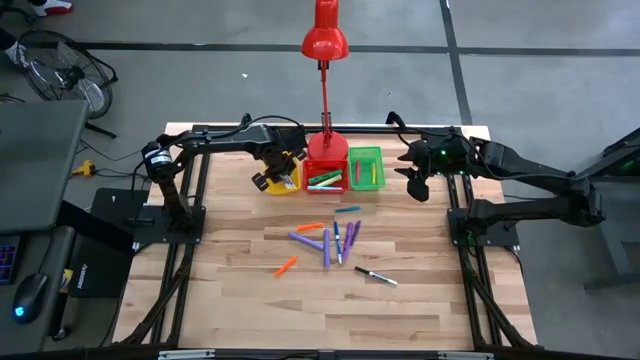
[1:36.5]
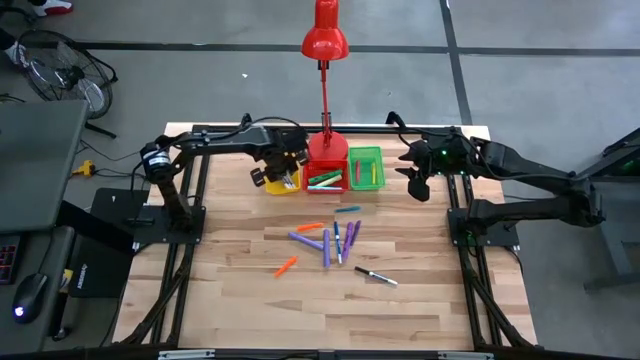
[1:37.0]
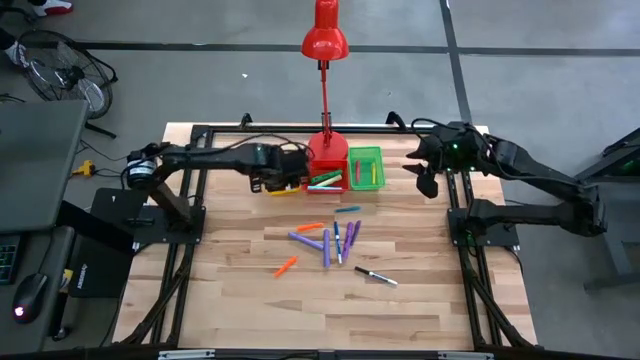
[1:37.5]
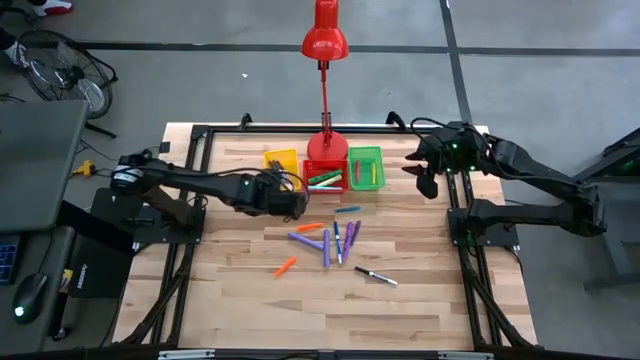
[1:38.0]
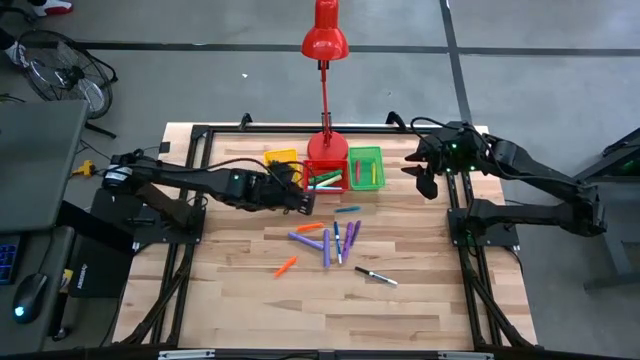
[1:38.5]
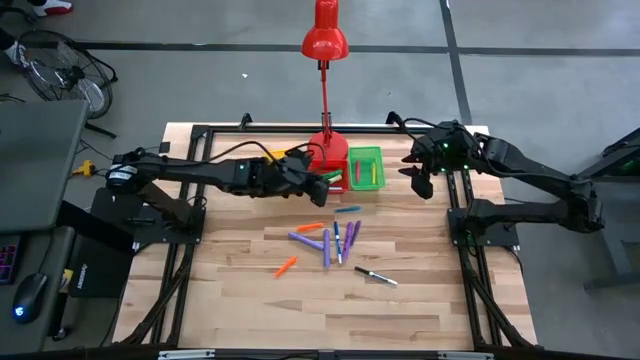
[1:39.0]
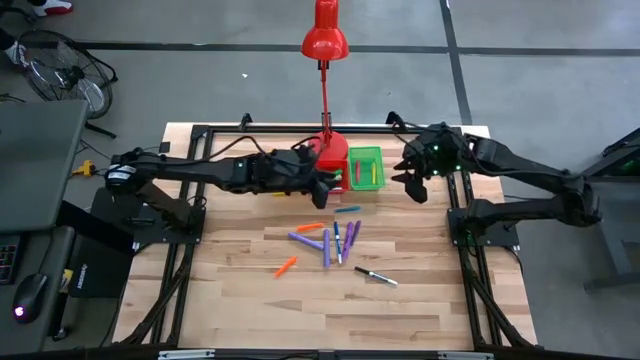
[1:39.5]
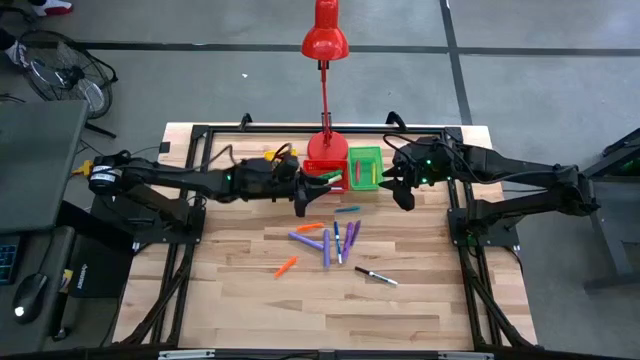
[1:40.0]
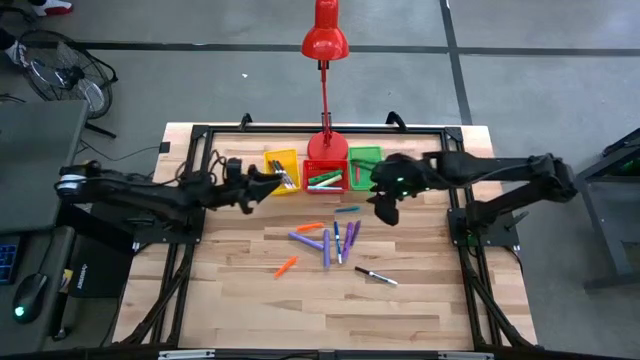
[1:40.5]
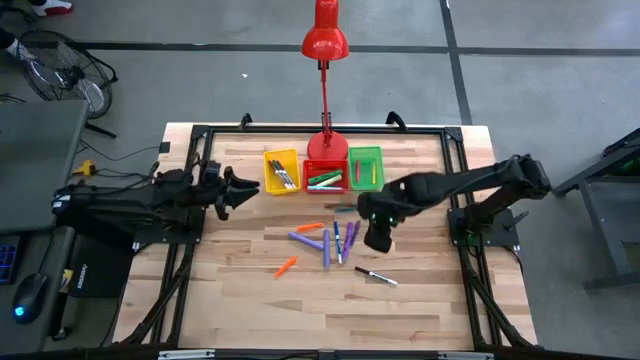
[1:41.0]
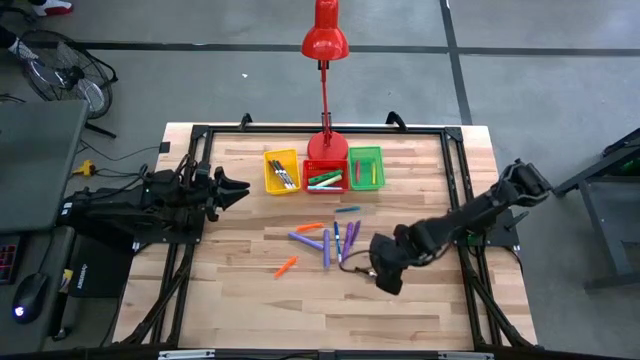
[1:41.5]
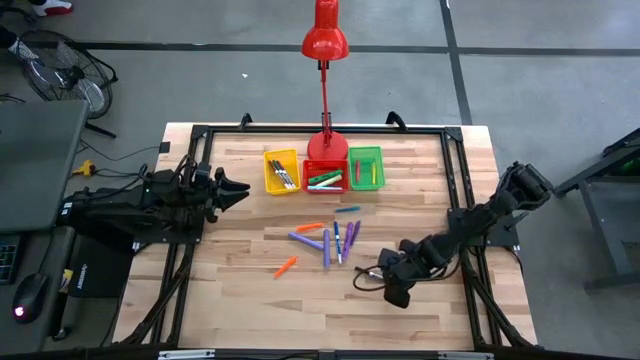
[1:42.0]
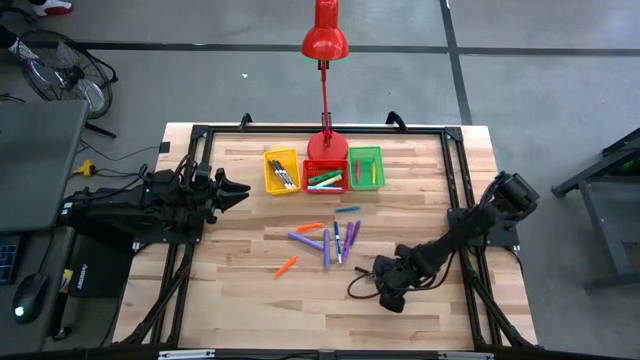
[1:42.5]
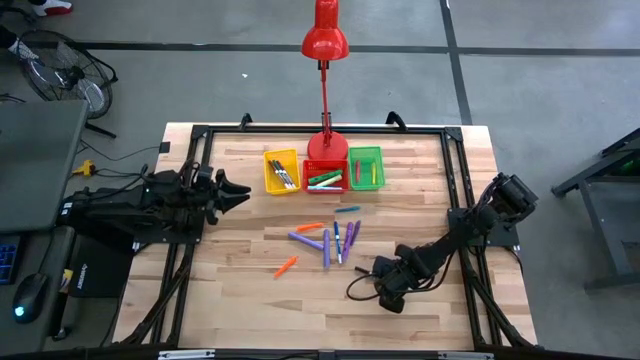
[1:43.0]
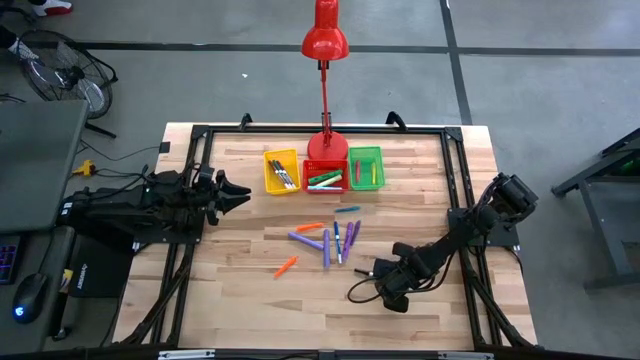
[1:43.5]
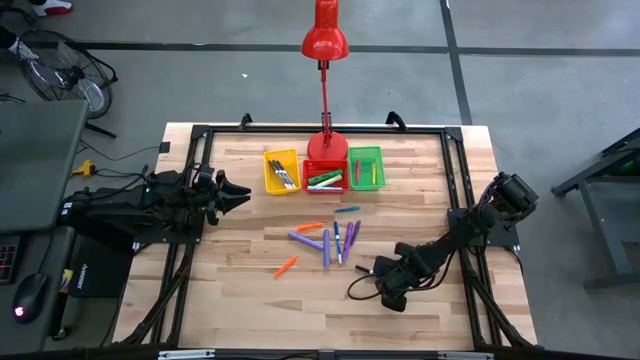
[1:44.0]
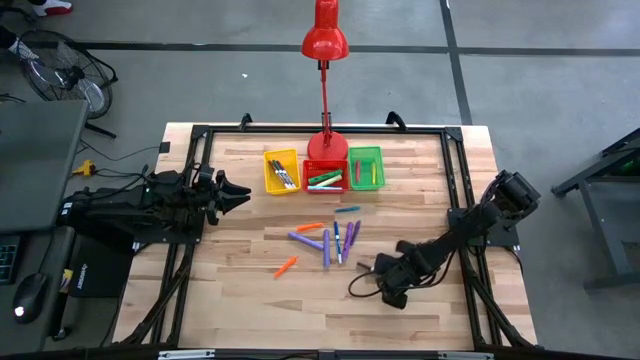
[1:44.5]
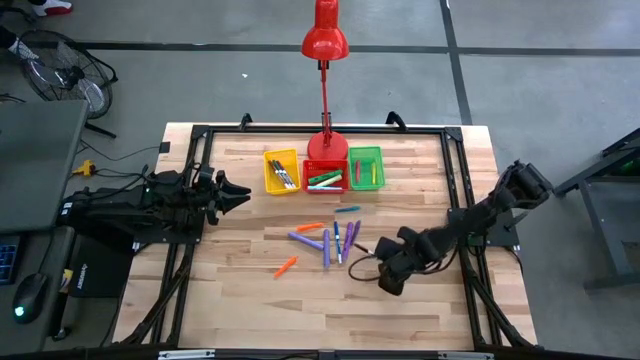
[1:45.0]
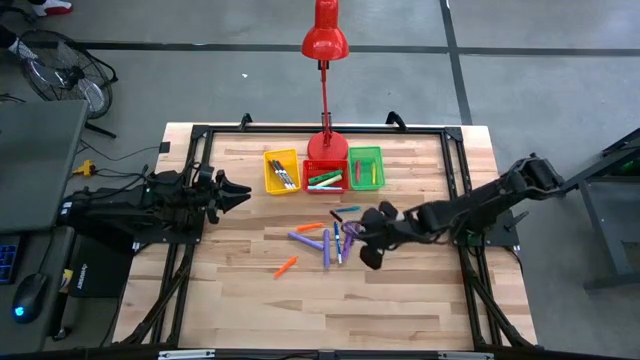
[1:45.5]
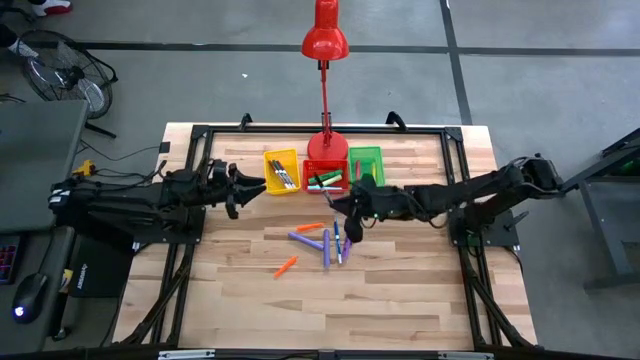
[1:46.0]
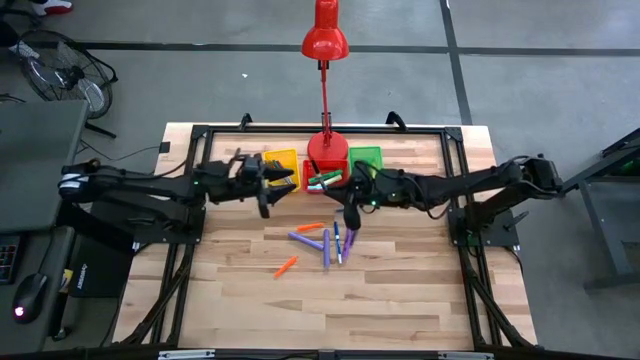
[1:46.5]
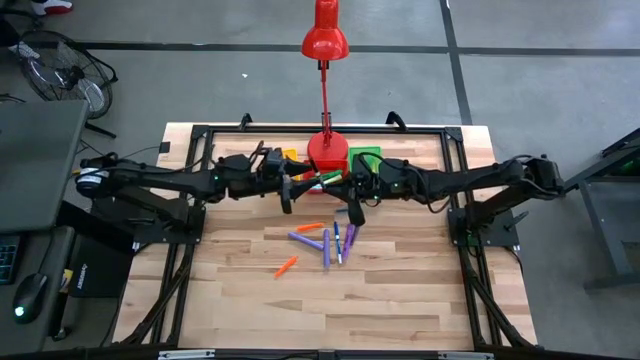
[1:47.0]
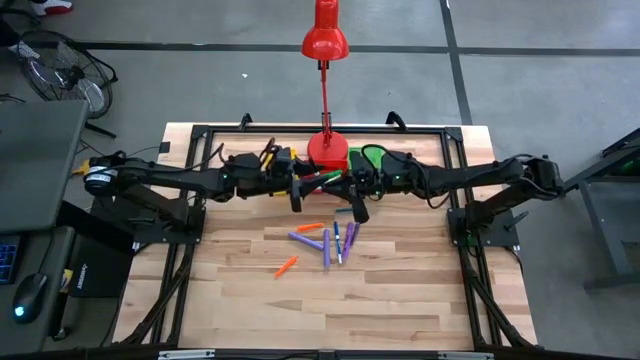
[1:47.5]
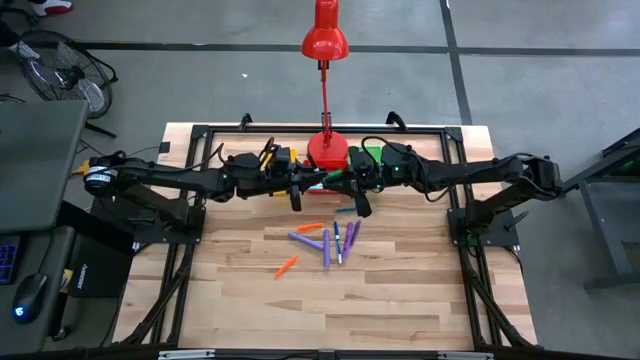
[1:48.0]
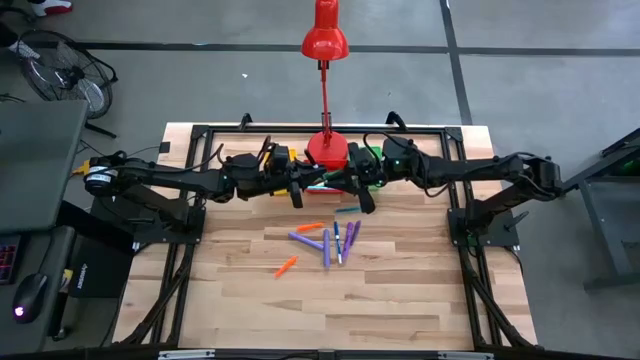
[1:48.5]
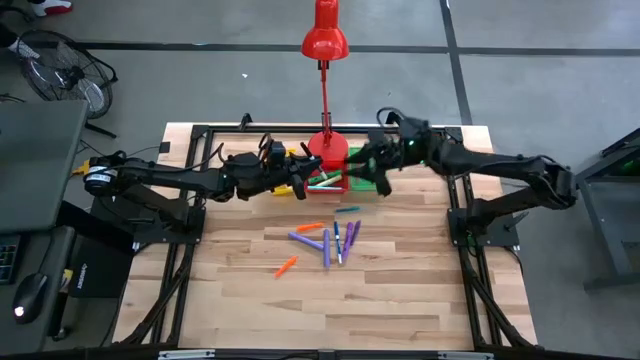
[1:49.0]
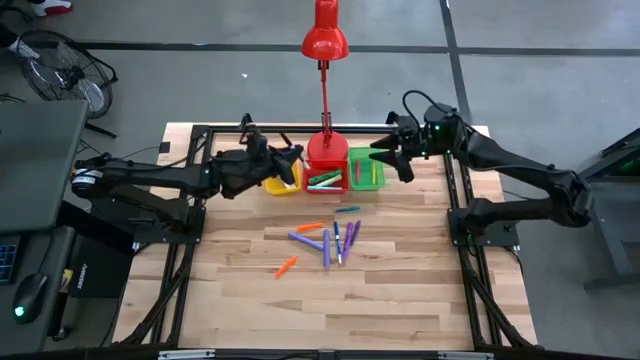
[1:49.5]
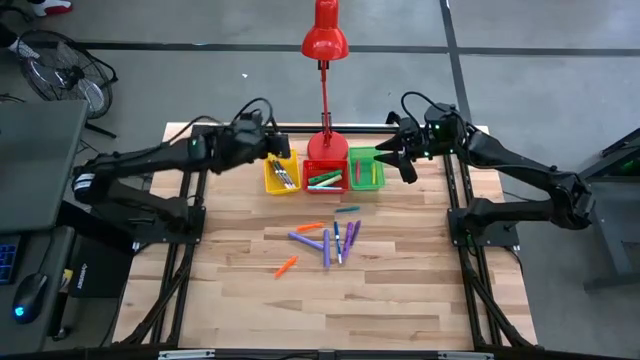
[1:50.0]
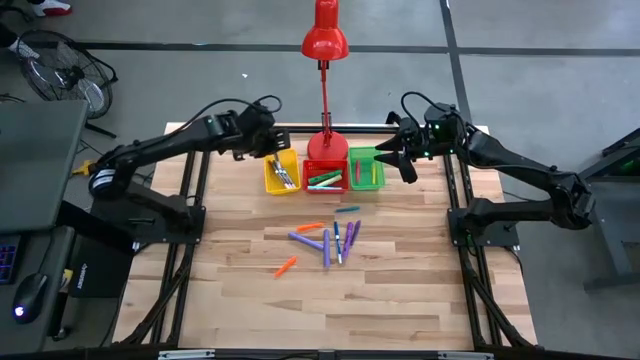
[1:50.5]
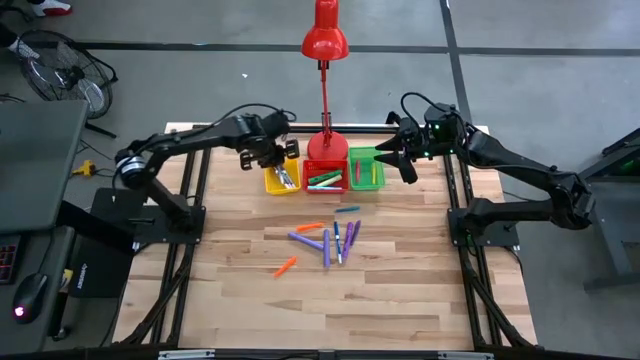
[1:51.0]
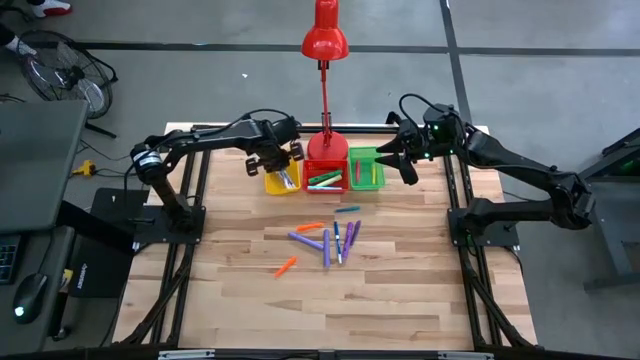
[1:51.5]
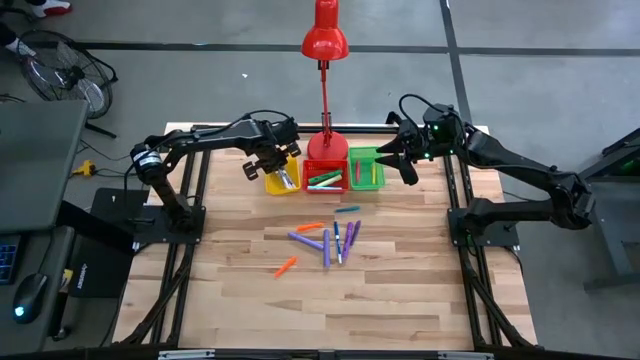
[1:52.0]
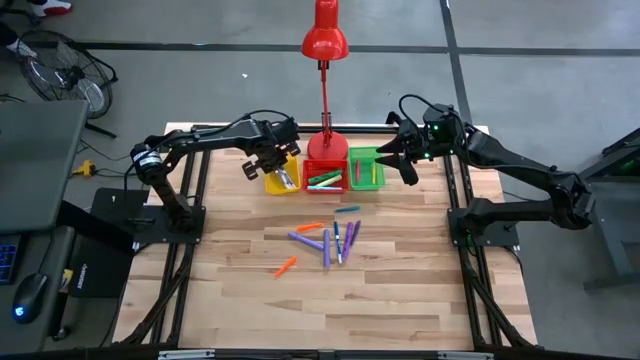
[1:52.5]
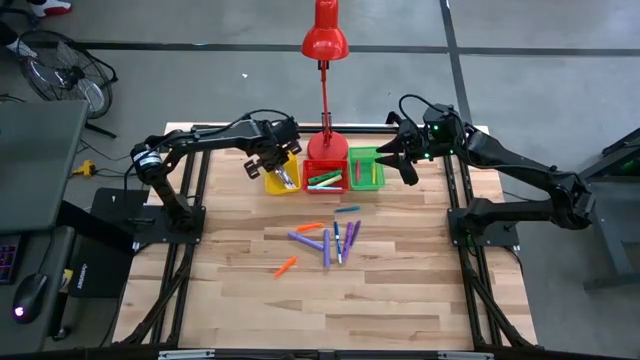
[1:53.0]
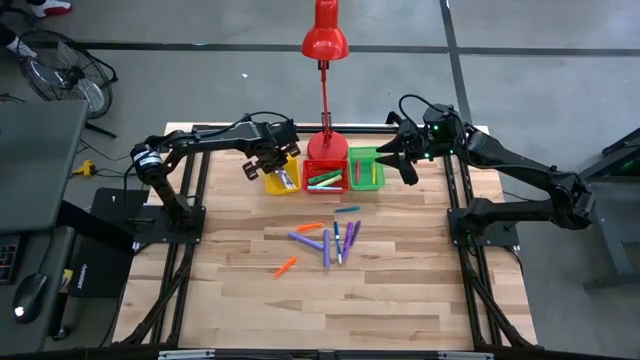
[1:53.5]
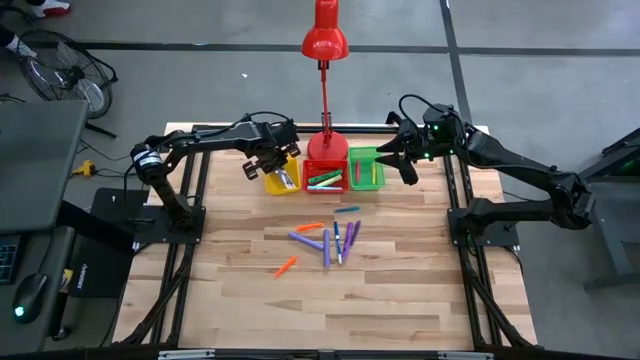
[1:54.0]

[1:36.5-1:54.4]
Task: Pick & Place Markers
Put the black marker pen into the yellow bin

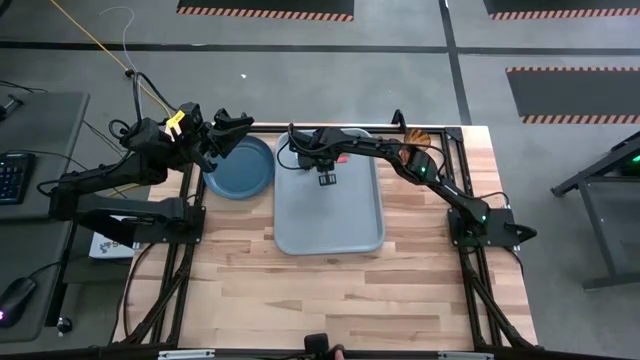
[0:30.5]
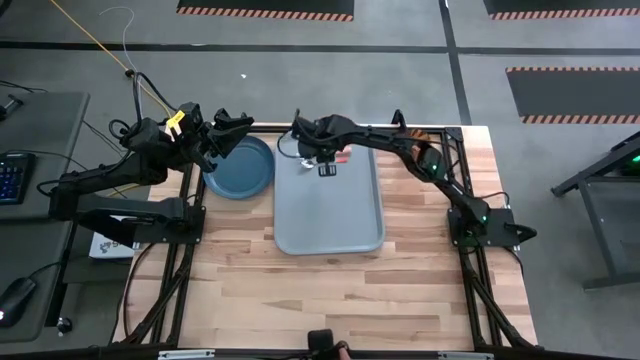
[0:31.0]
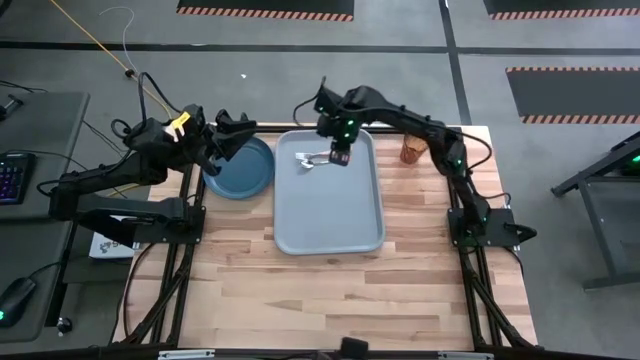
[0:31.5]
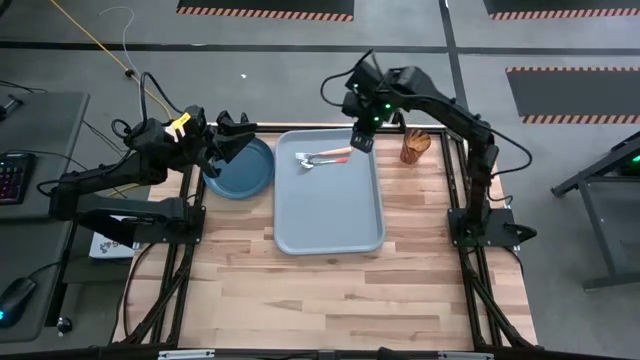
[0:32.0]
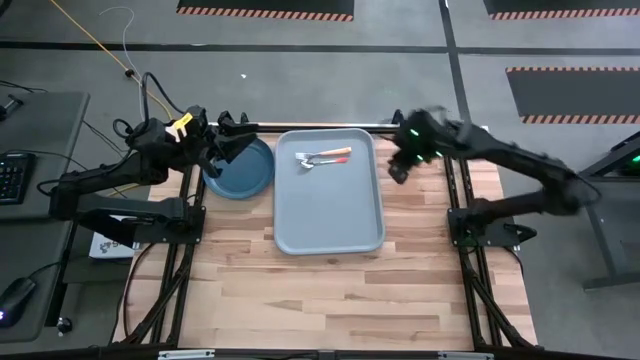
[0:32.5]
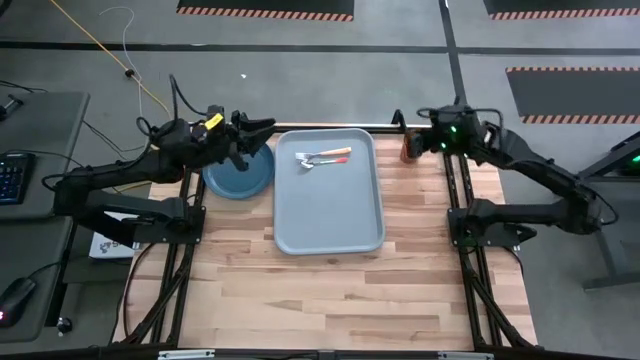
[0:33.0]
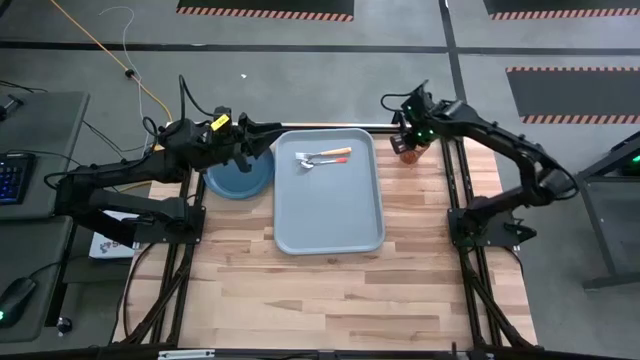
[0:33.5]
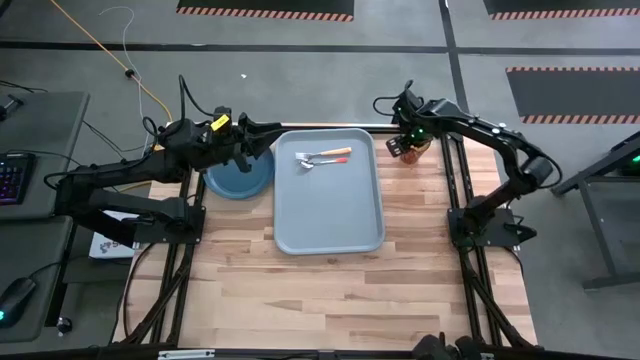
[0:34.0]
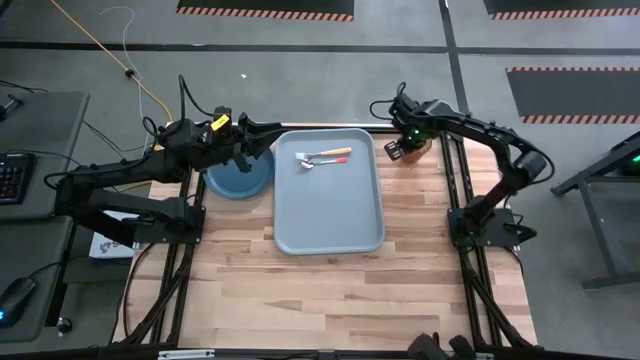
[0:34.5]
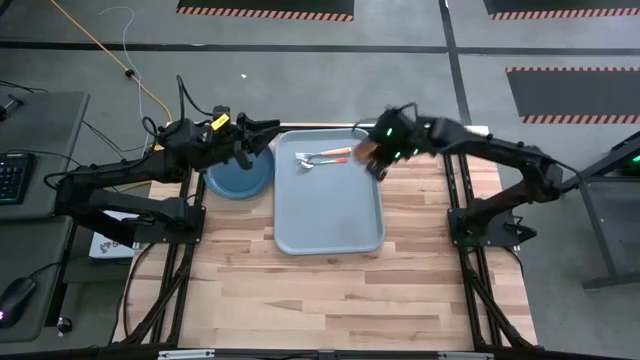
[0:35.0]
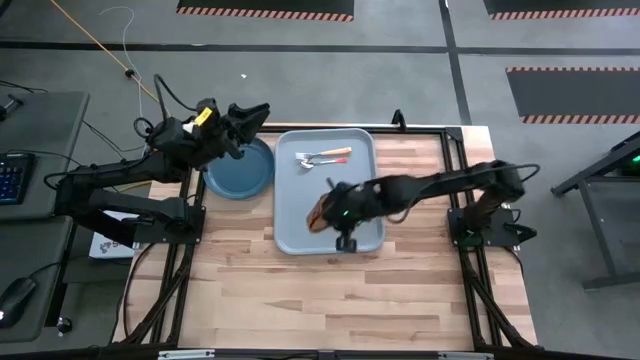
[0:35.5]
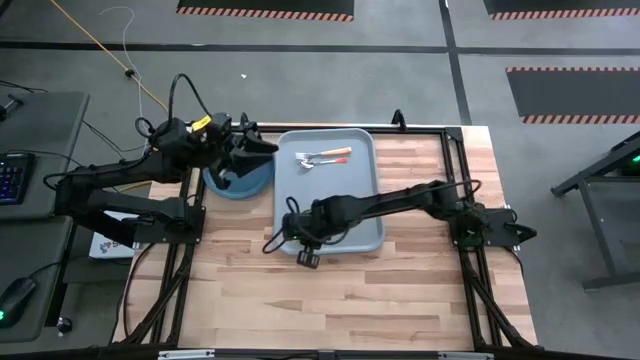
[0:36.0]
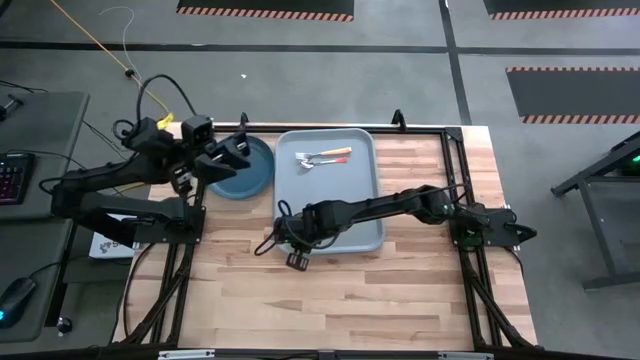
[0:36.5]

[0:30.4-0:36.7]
Task: Pick and place plate/cup/fork/spoon on tray
Put the brown glass on the bottom left of the gray tray
